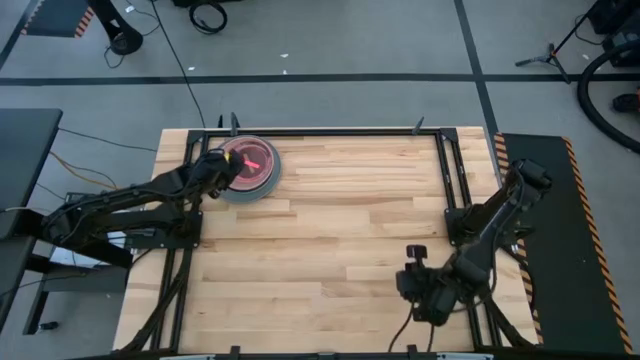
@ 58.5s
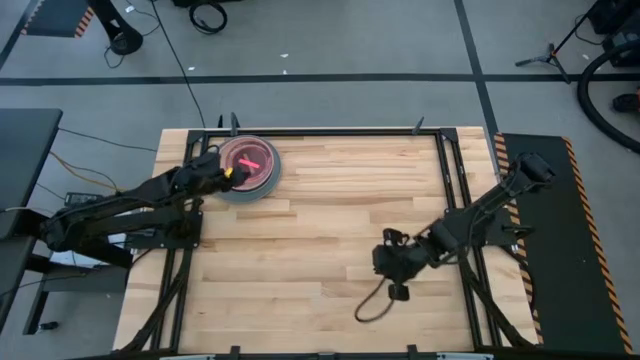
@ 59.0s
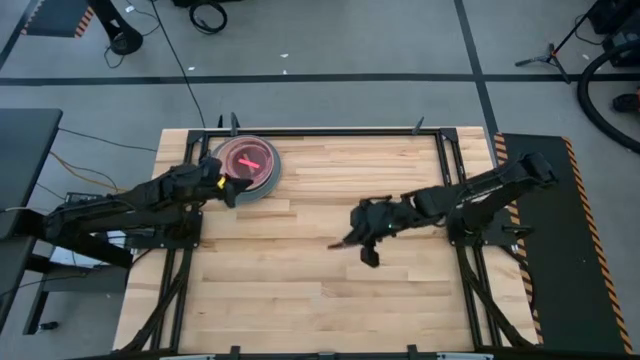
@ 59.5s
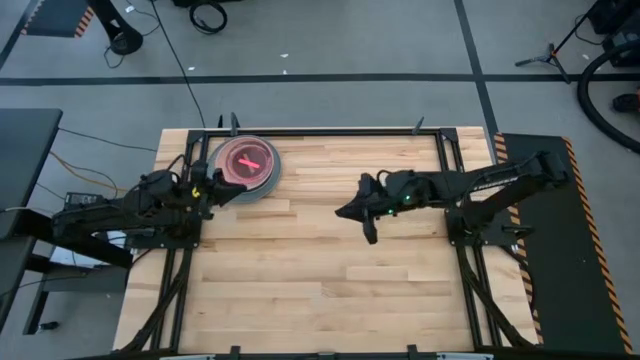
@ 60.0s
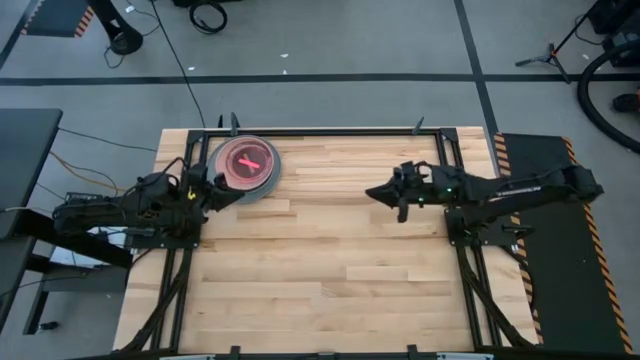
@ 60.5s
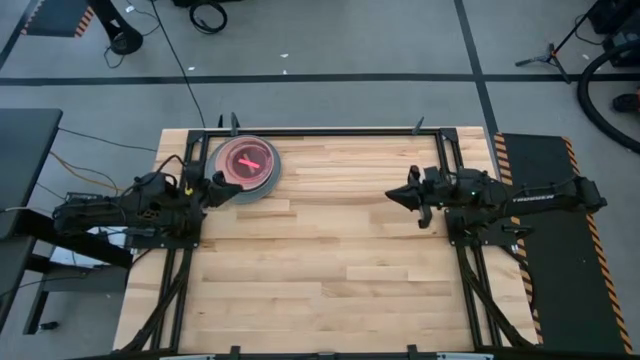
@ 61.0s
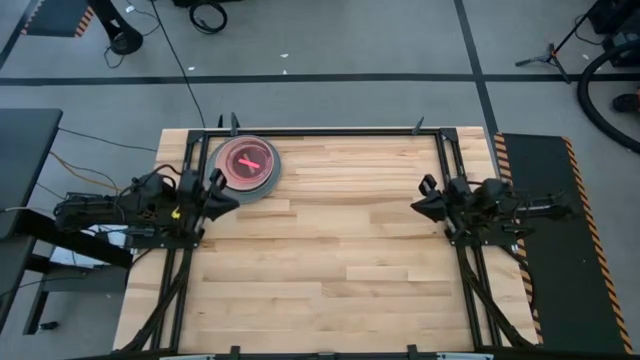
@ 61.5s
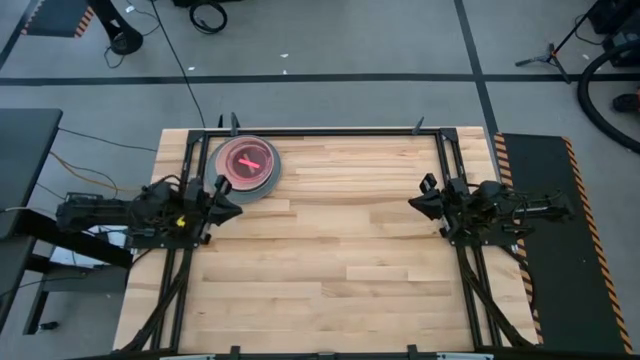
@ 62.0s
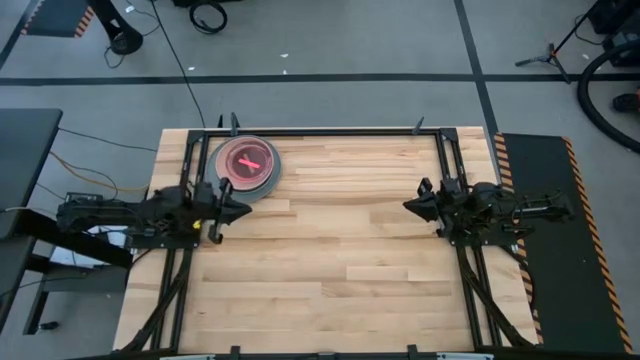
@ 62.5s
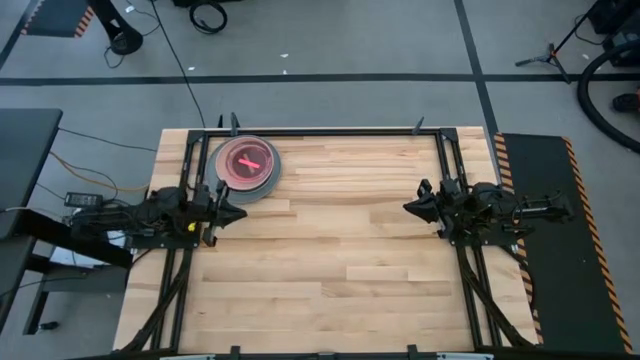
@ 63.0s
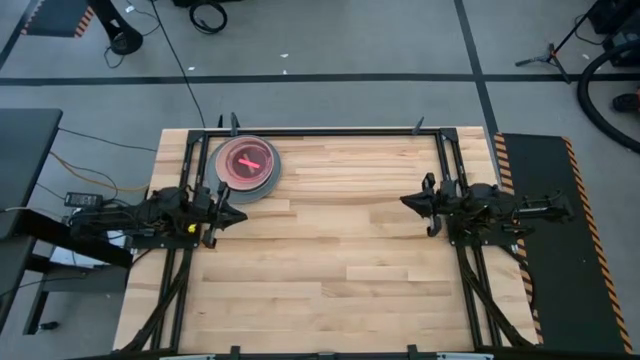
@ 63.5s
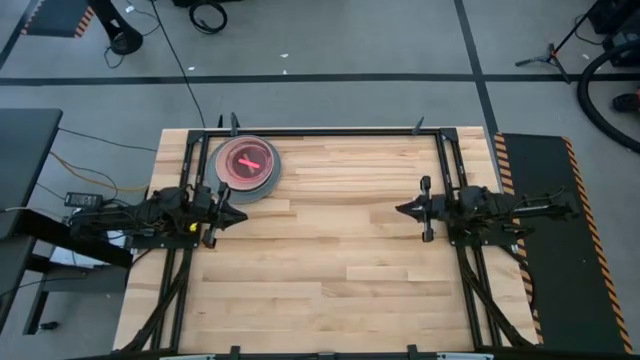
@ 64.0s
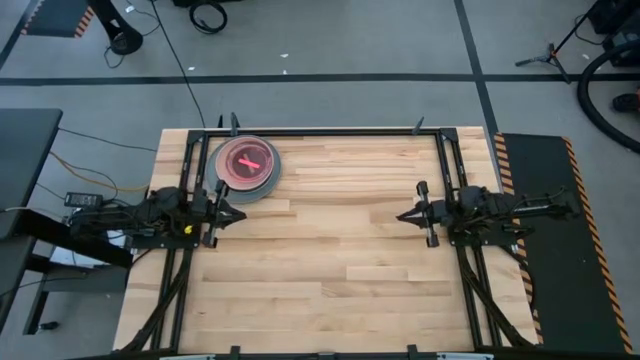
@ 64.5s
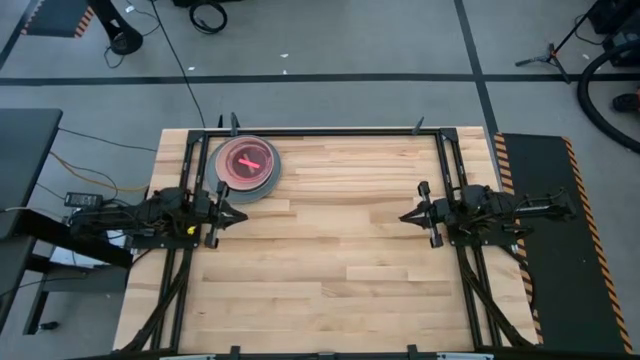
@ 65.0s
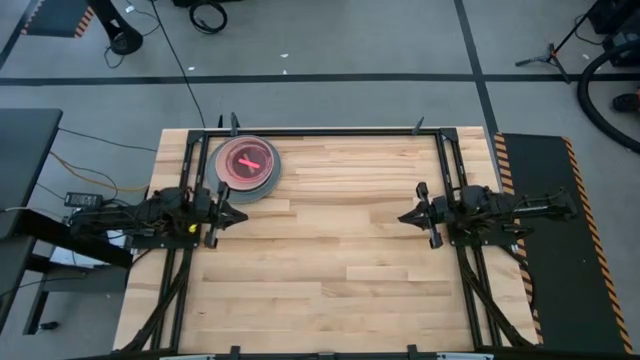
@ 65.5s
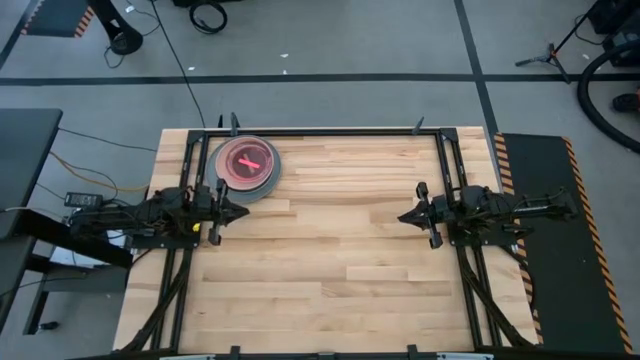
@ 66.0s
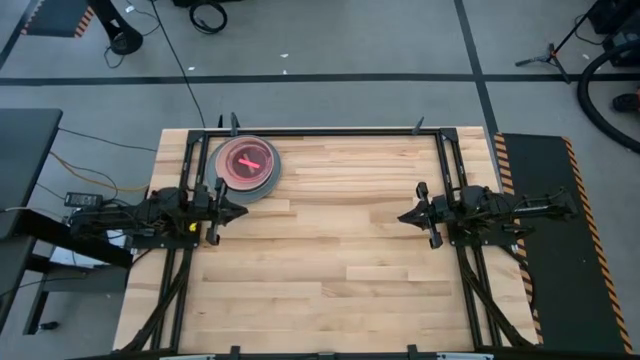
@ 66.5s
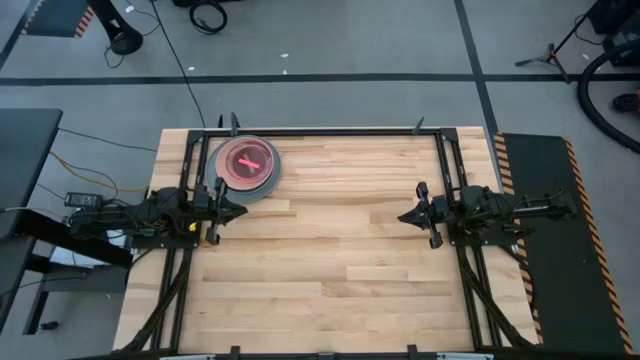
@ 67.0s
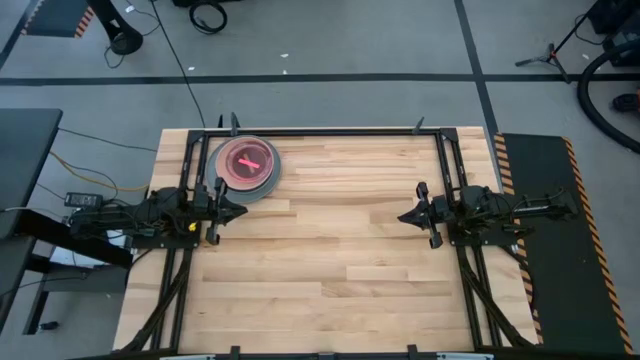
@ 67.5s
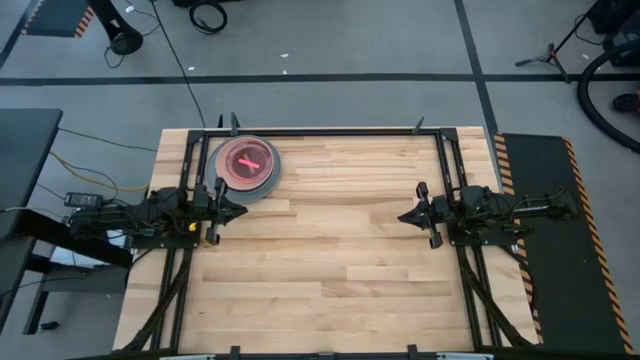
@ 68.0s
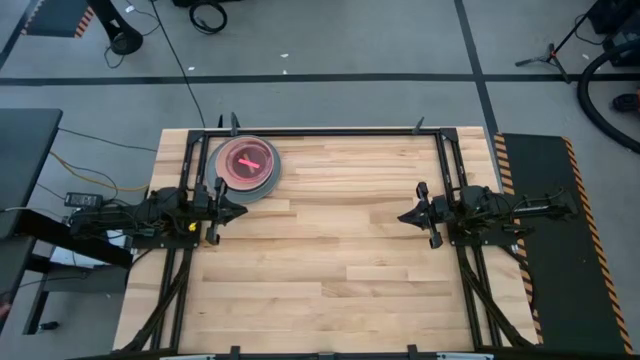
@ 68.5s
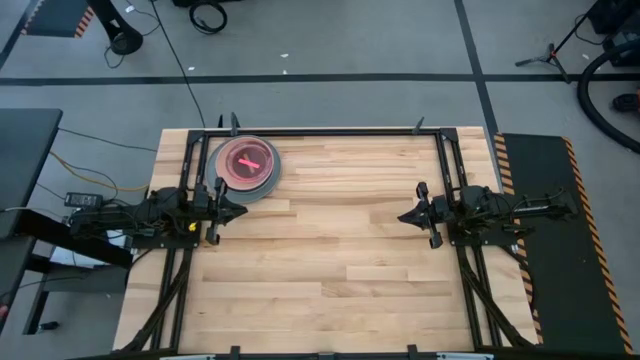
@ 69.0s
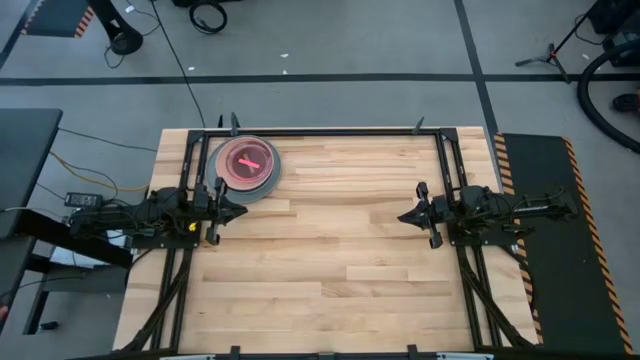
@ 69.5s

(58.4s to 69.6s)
Task: Stack plastic plates
Return to Home Position

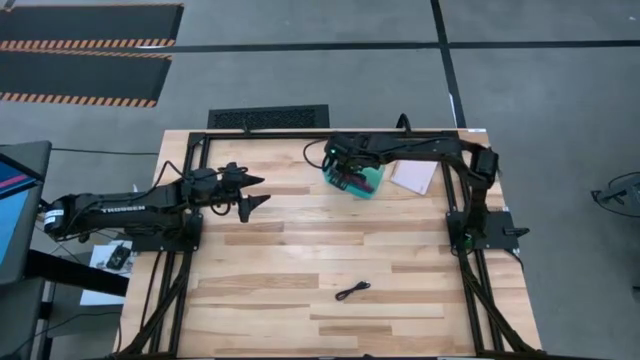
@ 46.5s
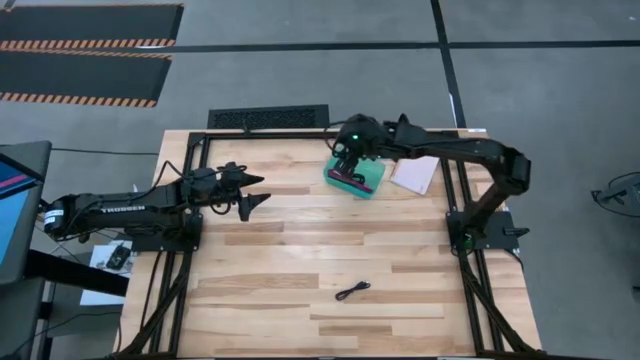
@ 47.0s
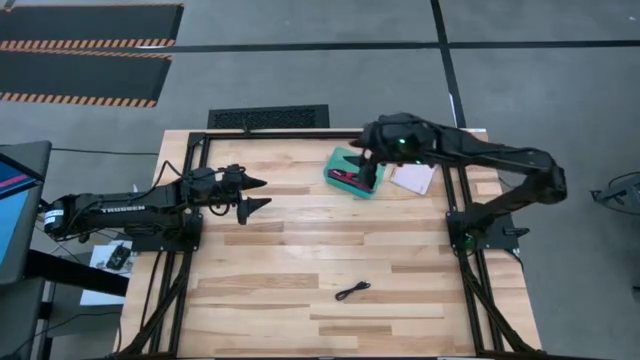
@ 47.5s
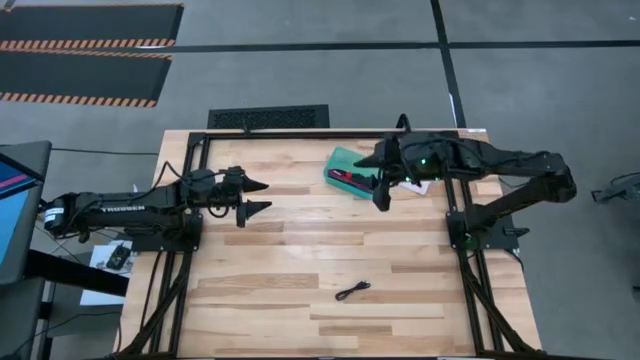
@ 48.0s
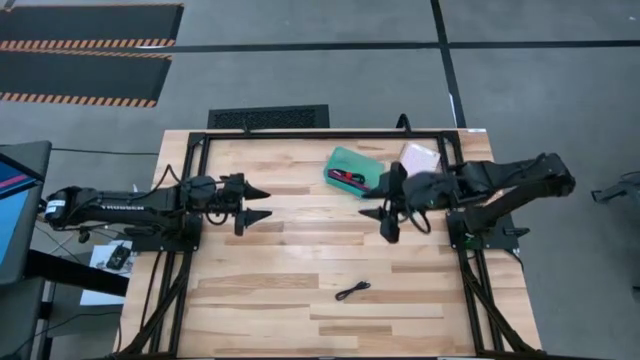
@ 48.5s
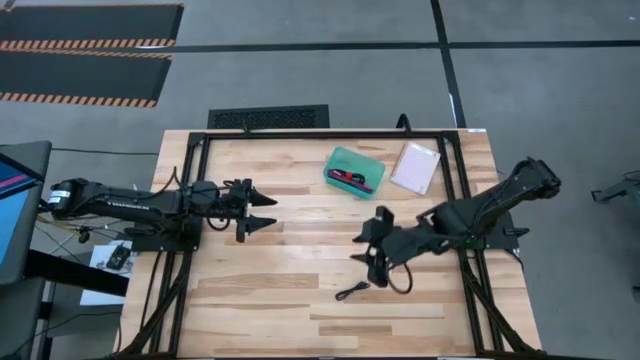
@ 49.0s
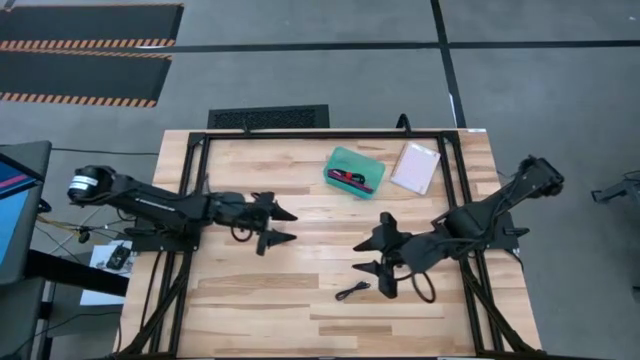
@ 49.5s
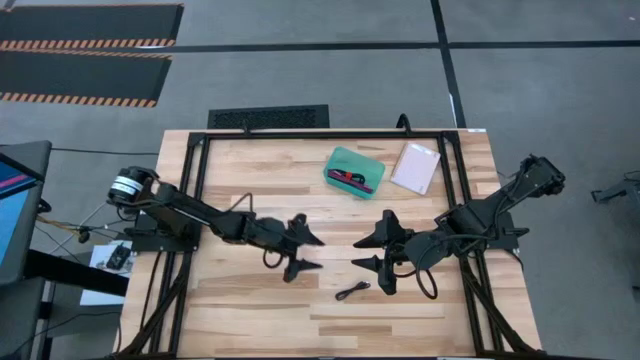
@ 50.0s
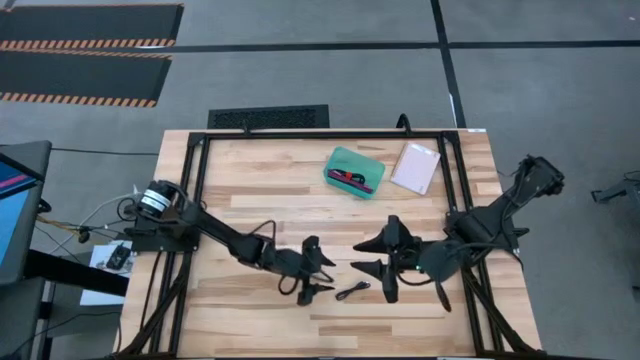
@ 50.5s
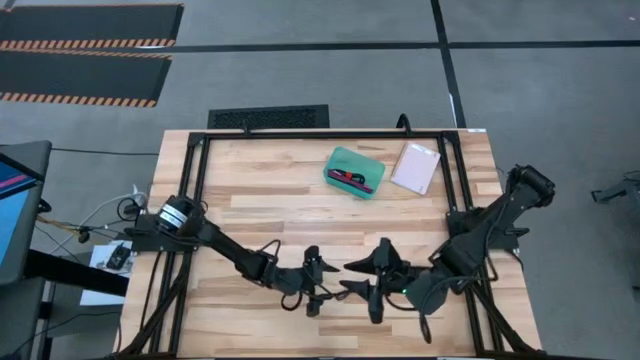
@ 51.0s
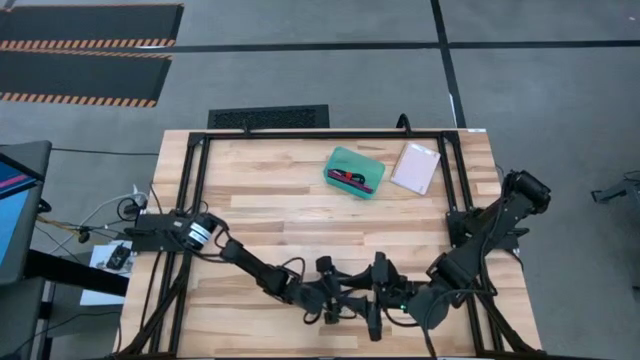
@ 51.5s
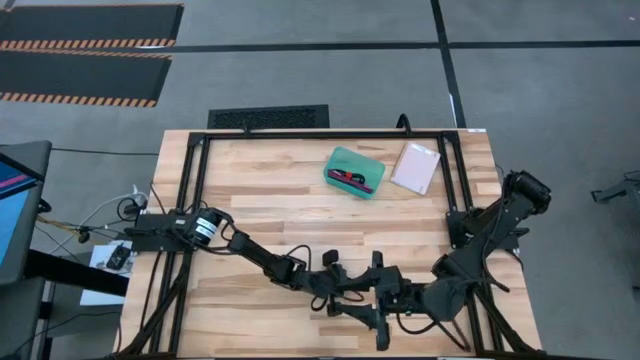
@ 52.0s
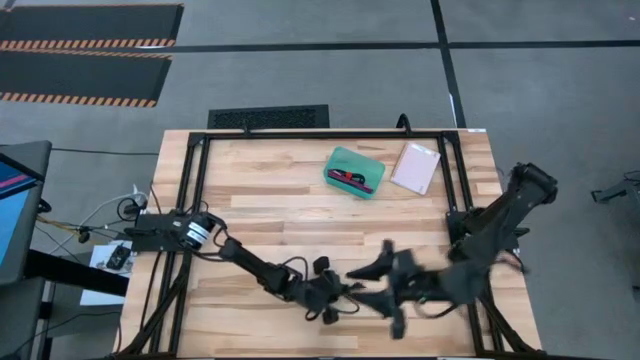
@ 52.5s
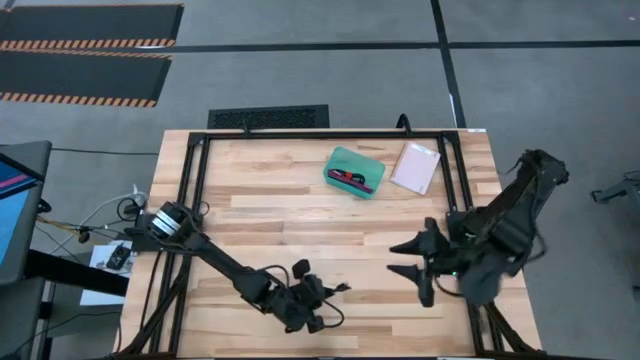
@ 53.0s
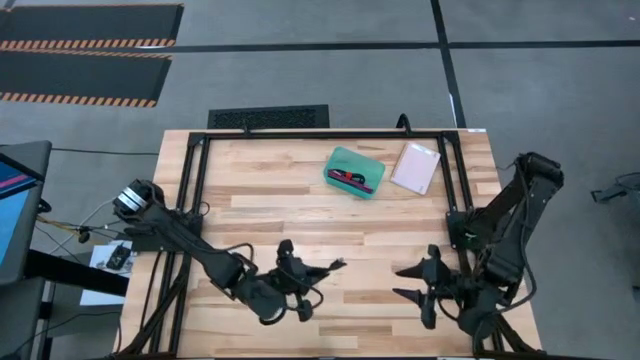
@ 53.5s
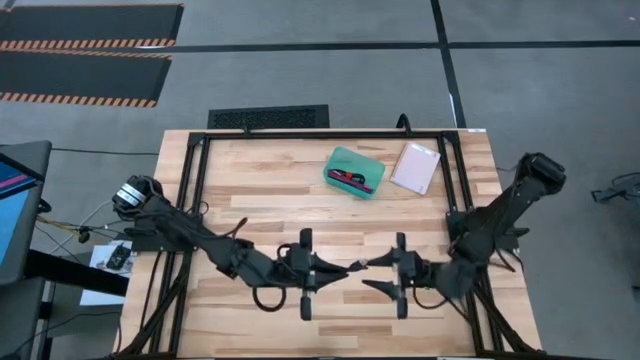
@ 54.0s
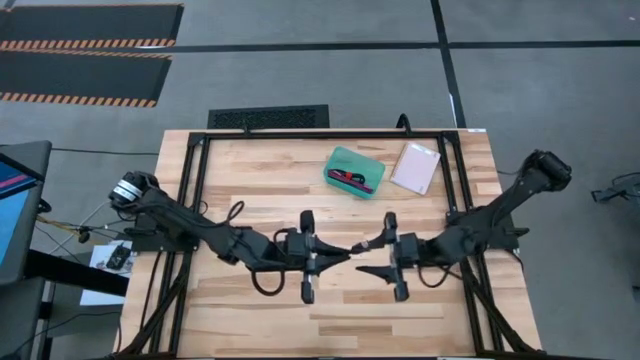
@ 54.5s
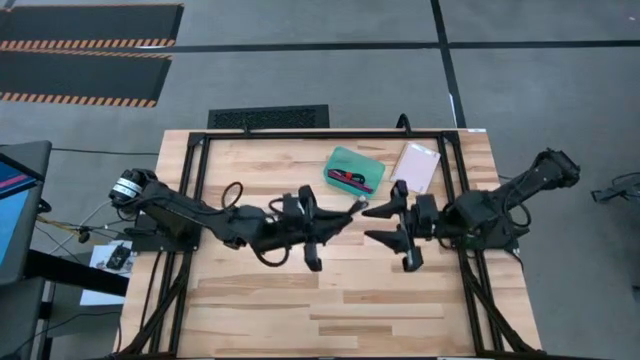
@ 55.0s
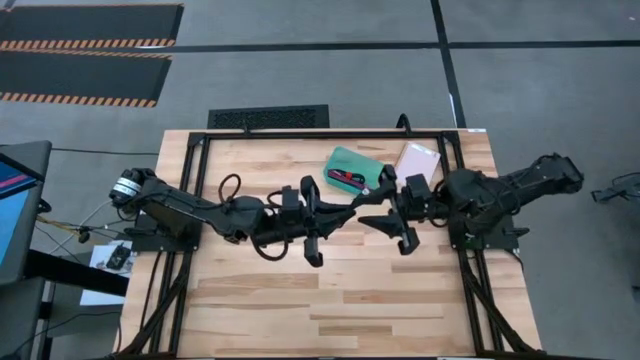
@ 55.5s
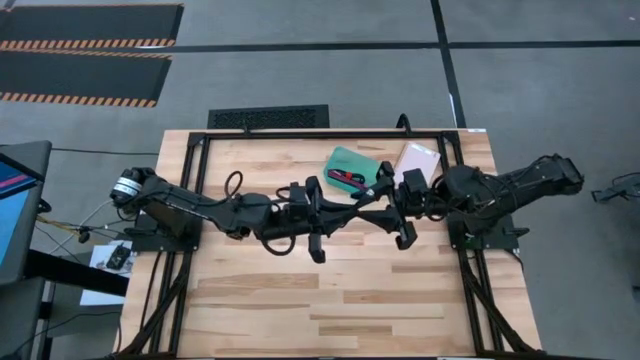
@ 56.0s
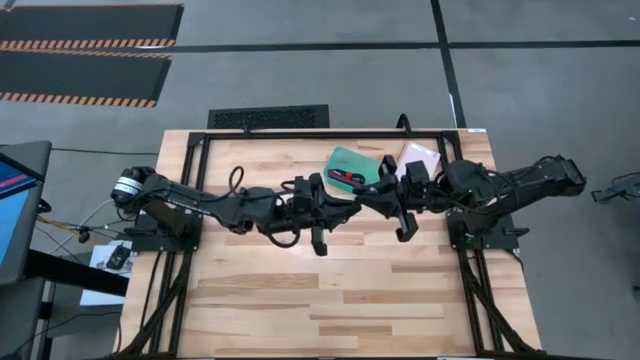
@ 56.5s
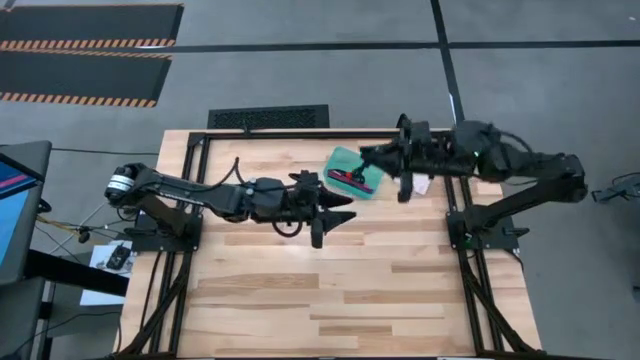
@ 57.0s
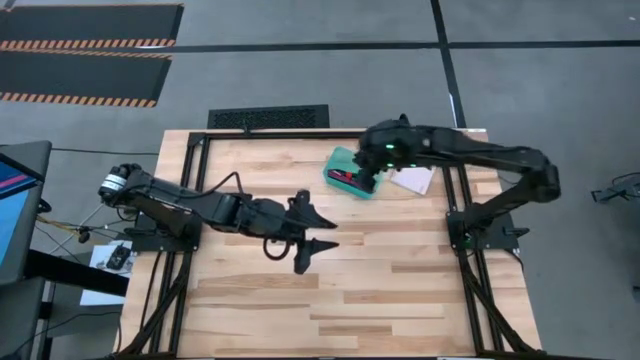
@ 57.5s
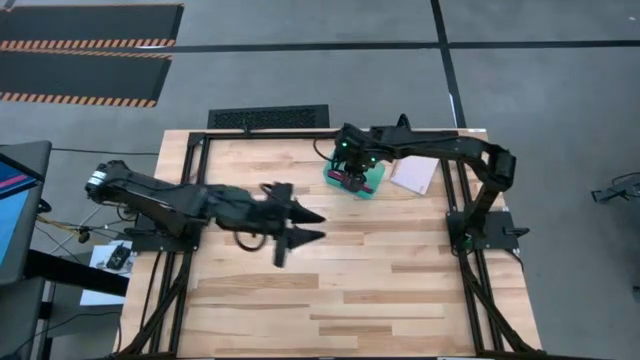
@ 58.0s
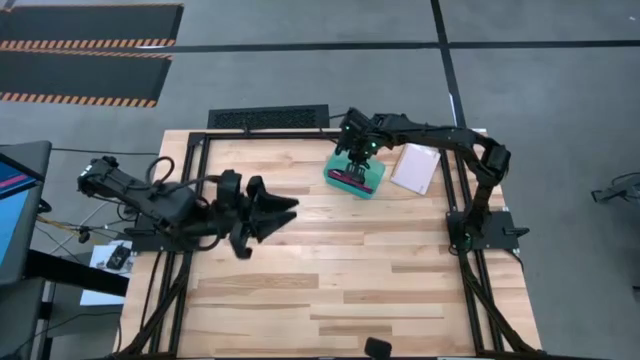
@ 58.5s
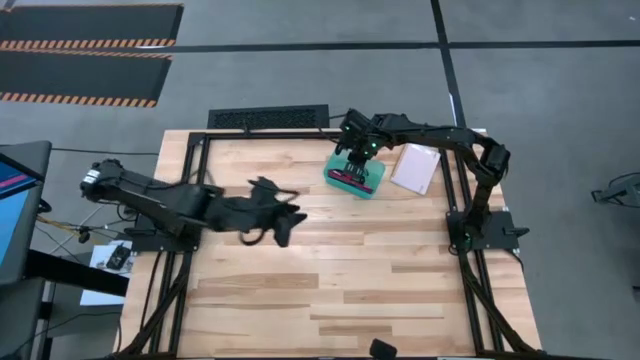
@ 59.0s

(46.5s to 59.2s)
Task: Pick and place USB-C Cables
Put the black charger cable into the light blue bin
